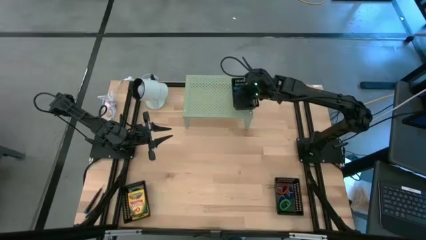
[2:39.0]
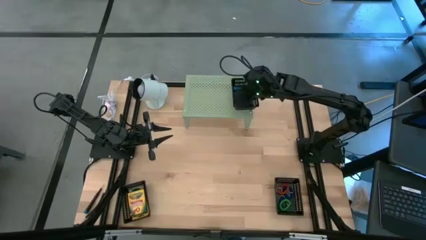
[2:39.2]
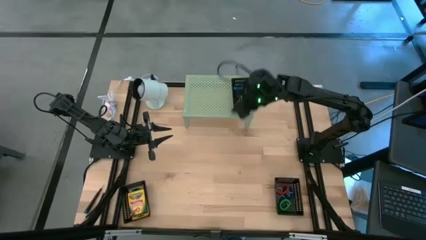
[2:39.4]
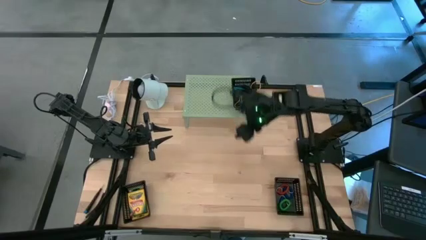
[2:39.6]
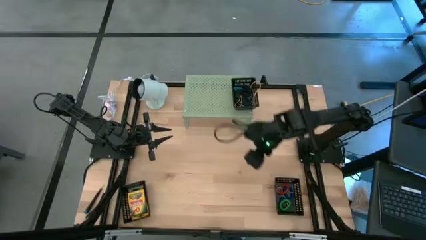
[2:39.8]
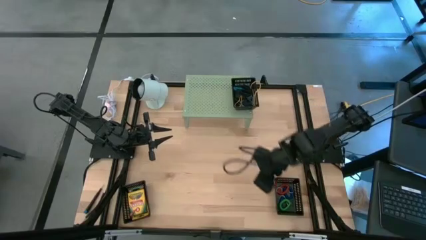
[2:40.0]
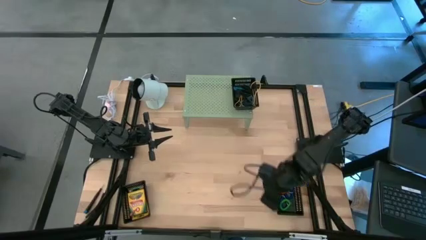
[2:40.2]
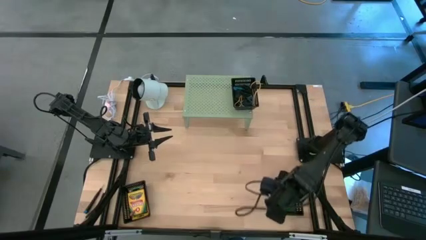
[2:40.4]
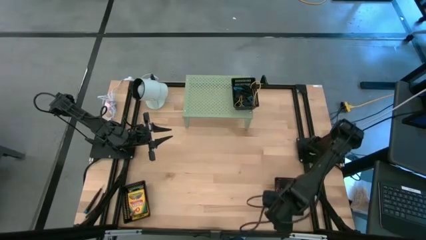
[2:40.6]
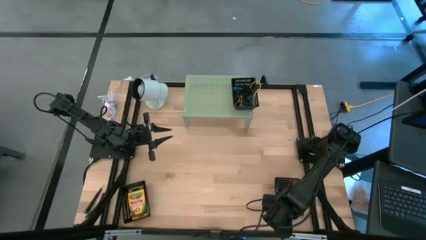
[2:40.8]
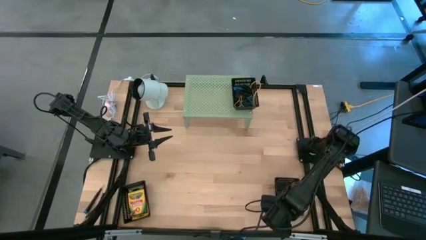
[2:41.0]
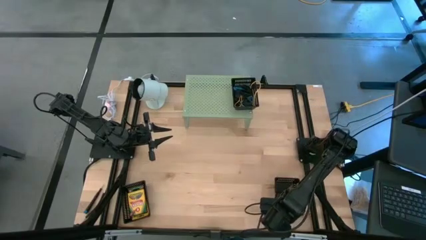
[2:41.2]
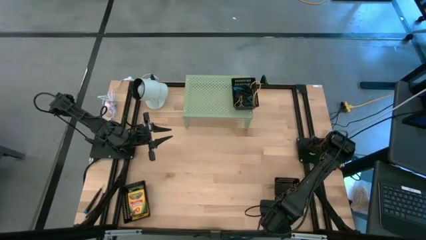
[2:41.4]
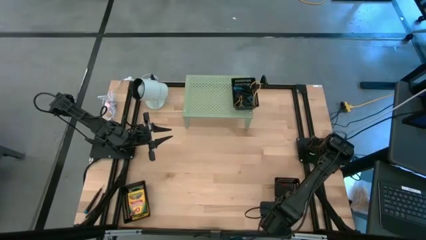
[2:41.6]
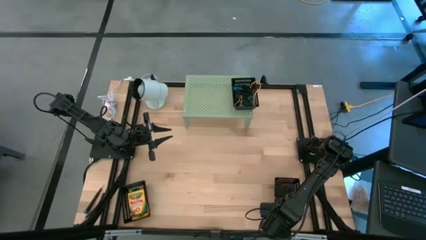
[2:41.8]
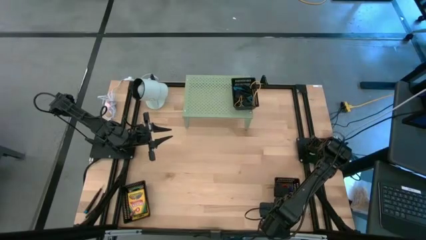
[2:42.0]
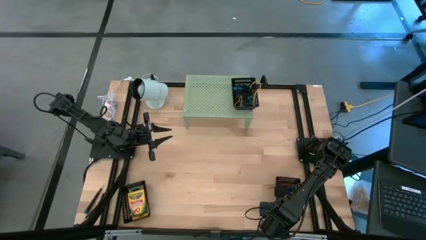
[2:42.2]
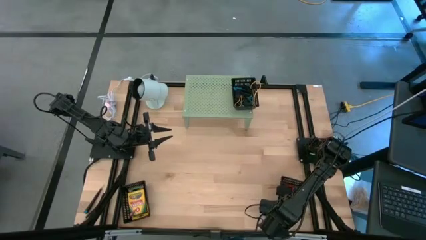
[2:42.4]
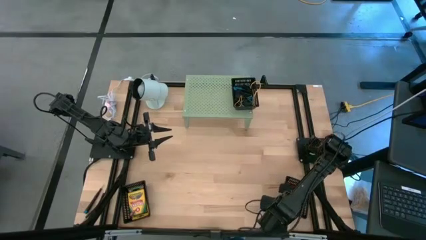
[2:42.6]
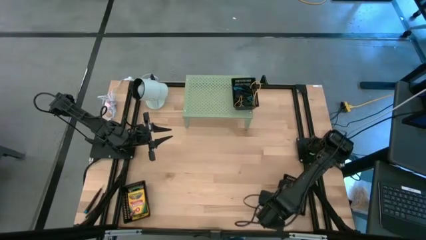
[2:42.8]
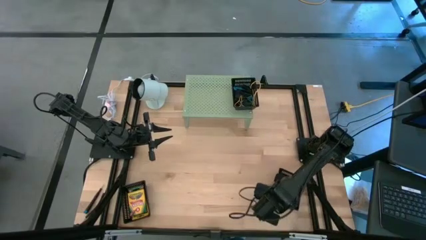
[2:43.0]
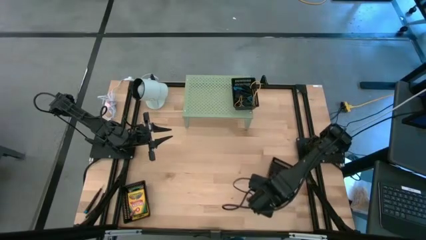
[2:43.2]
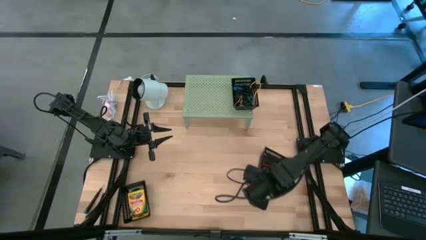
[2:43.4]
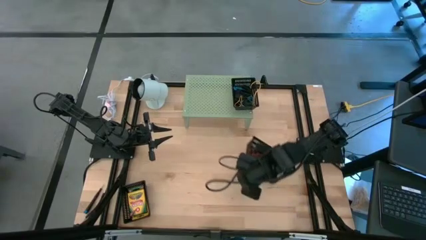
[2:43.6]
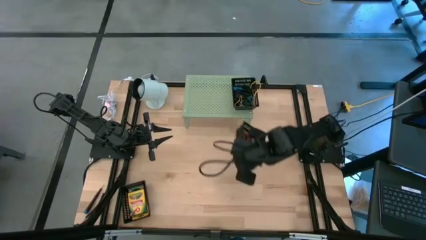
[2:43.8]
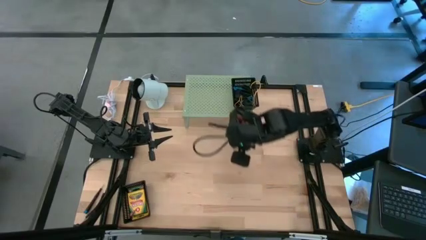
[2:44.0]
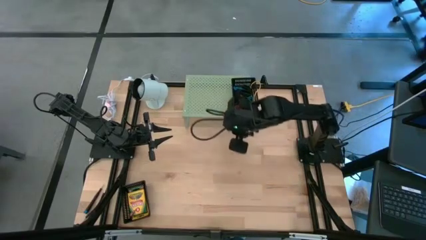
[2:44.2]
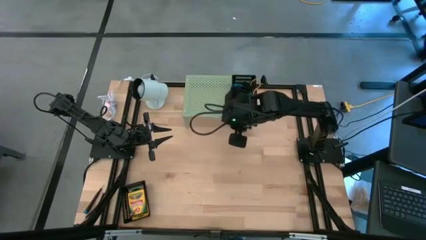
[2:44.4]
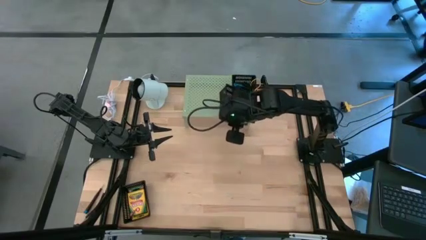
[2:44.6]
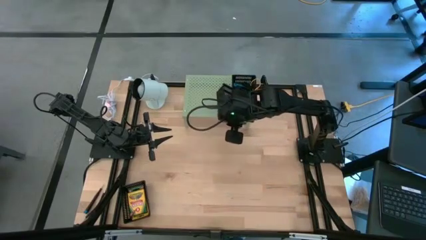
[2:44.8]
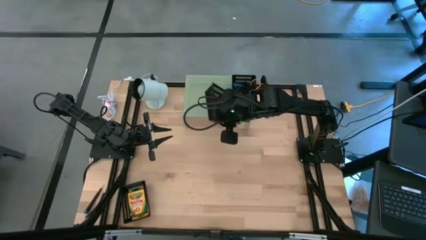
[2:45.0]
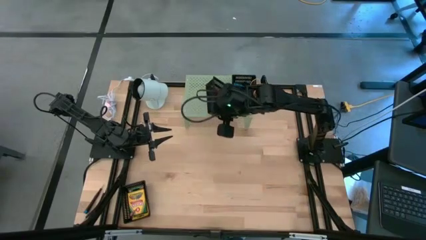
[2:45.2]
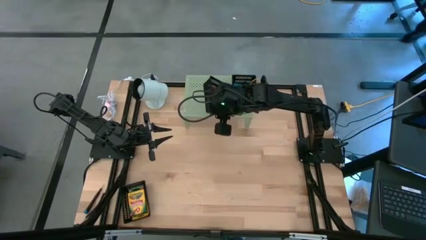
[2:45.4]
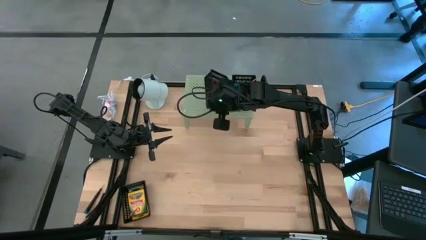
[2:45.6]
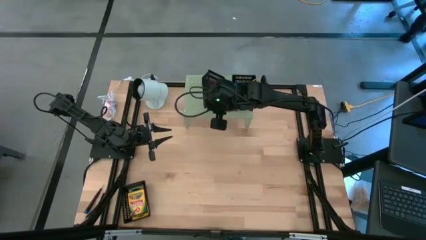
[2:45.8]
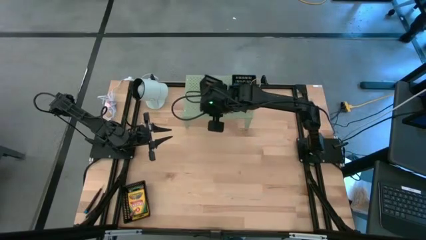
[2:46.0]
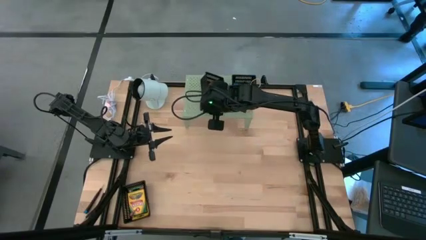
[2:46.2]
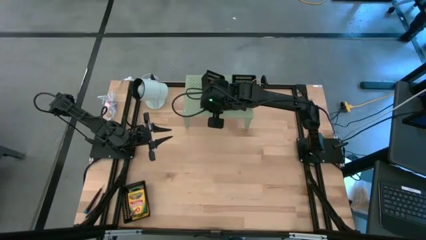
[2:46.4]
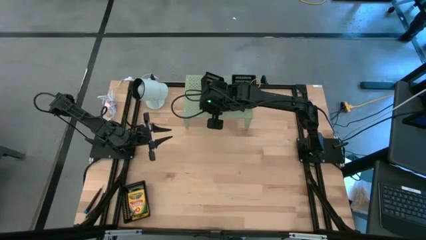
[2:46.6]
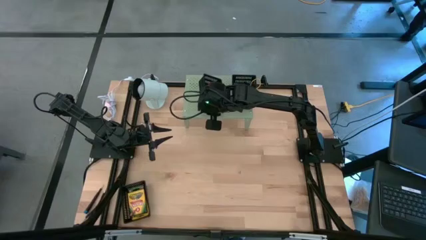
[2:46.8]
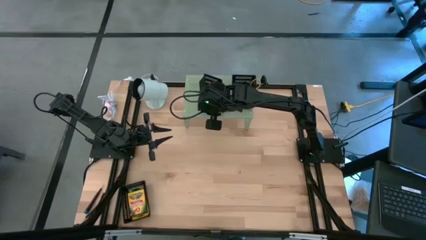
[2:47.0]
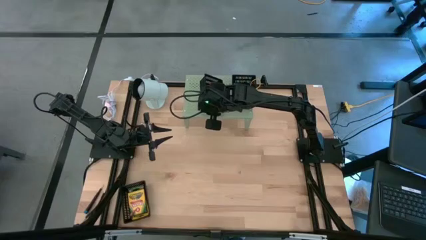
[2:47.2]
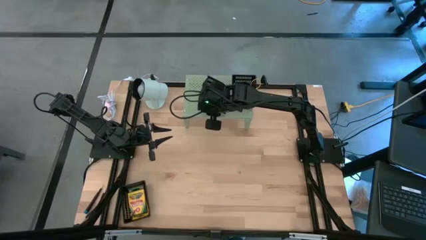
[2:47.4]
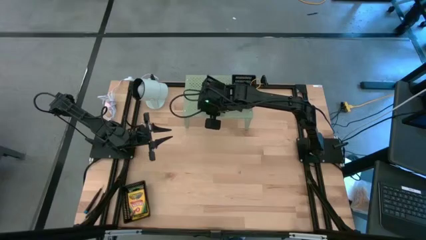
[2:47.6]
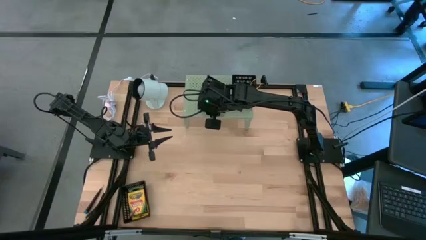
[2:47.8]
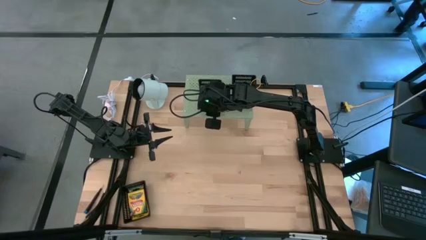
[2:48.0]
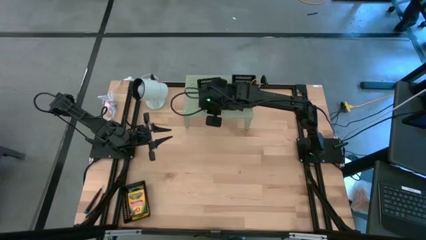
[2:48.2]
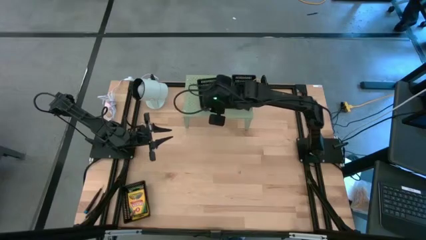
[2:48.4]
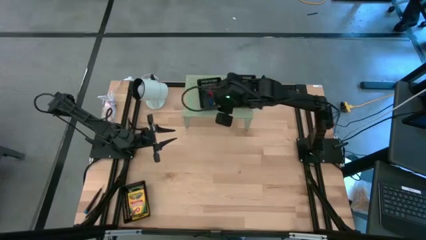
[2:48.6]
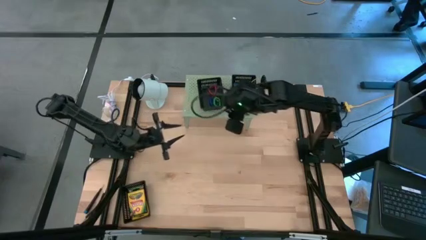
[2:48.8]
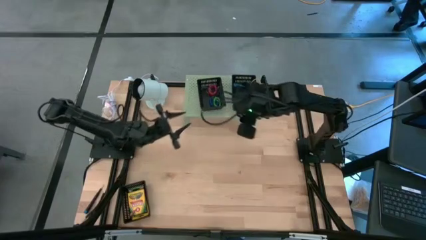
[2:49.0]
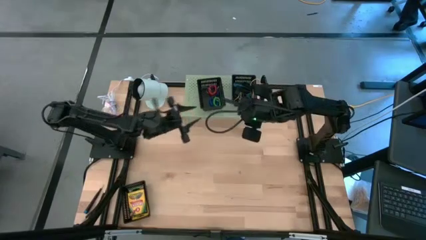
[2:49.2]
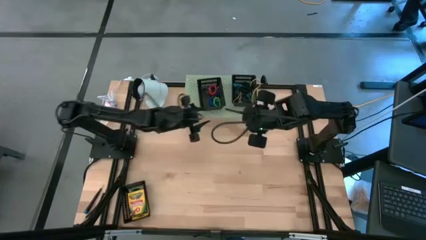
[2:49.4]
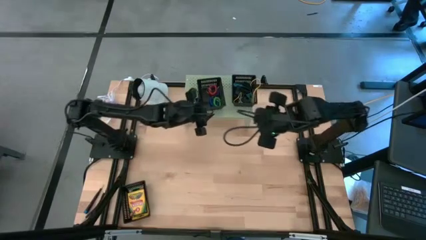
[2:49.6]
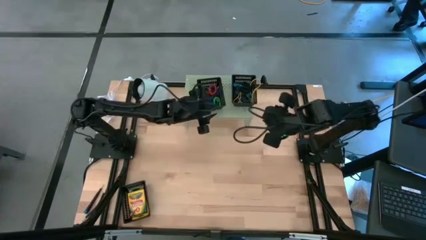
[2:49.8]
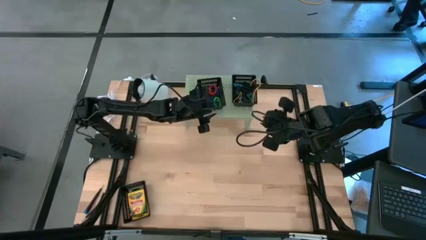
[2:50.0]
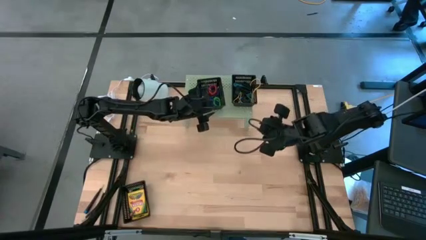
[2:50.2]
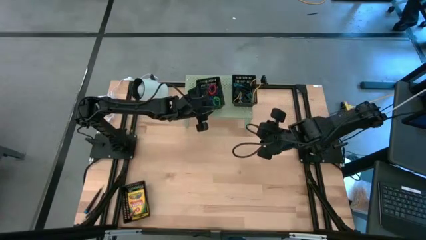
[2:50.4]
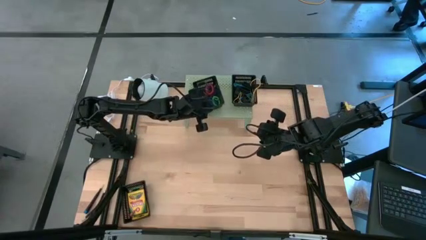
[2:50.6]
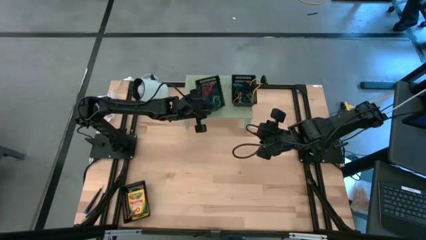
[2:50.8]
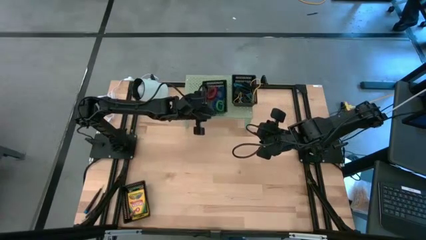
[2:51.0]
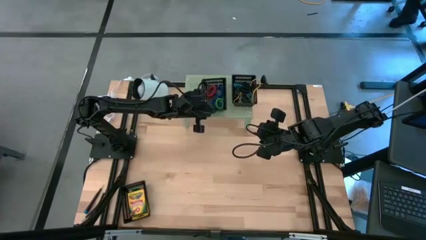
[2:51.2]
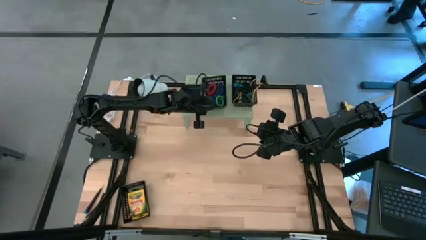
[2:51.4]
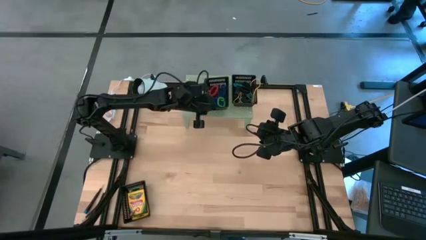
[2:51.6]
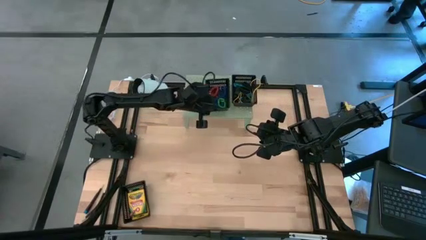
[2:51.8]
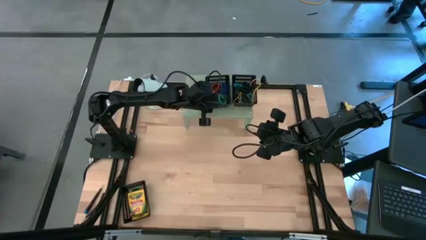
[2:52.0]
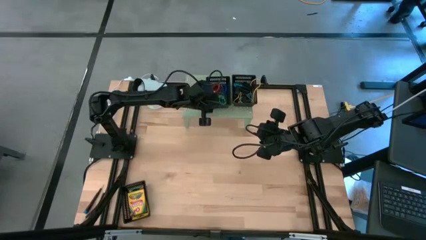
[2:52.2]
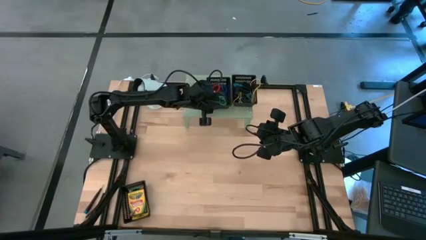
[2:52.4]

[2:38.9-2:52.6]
Task: Pick & Place Office Desk Supplies
Put the right black bin on the shelf
